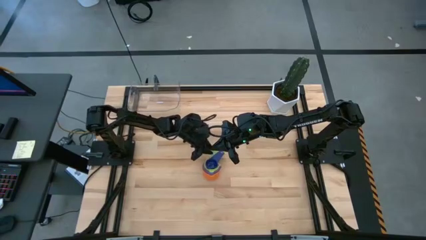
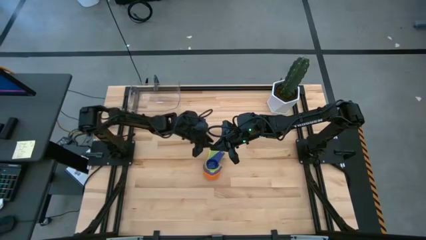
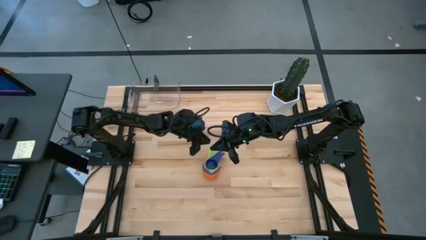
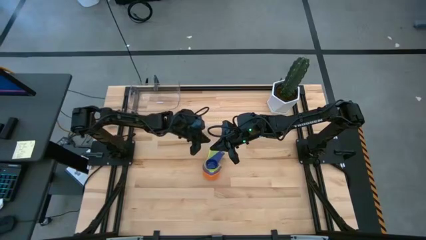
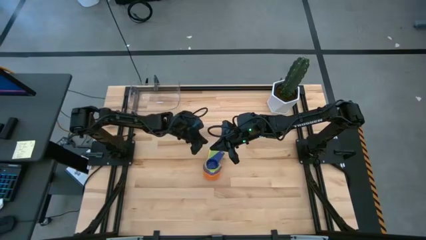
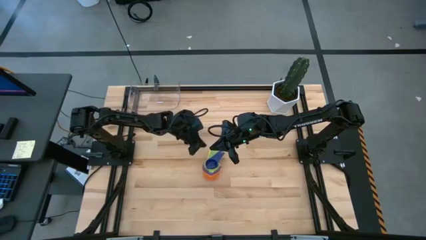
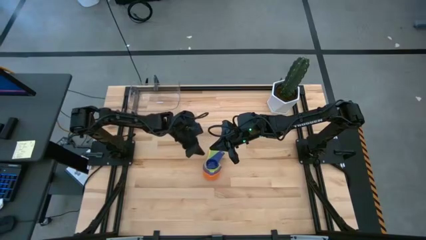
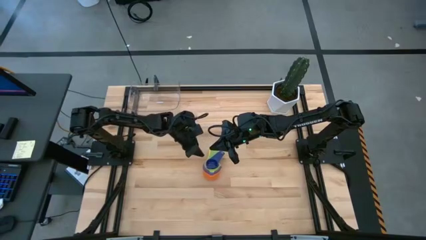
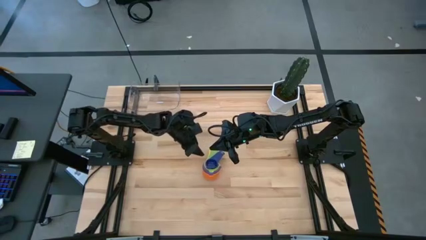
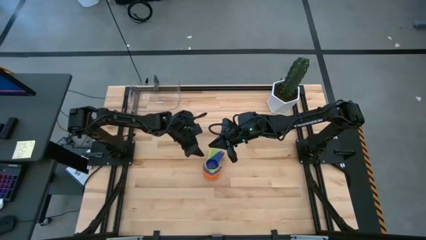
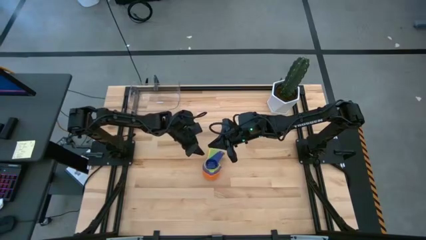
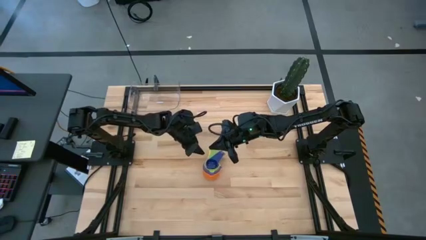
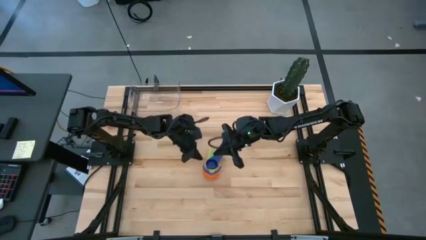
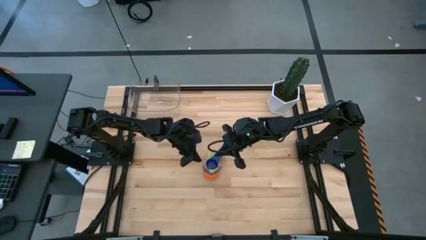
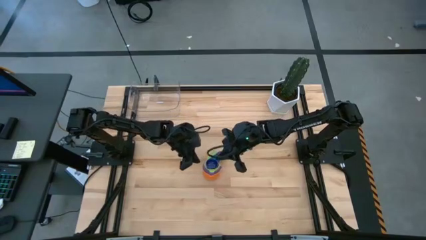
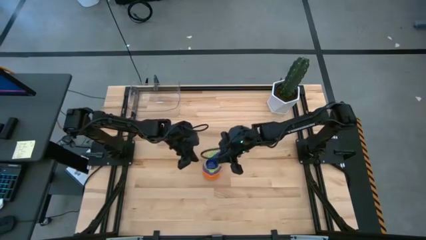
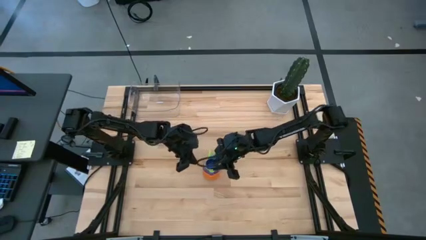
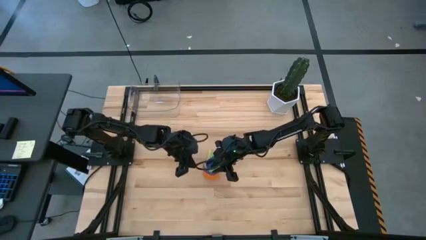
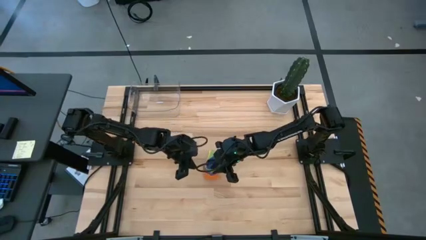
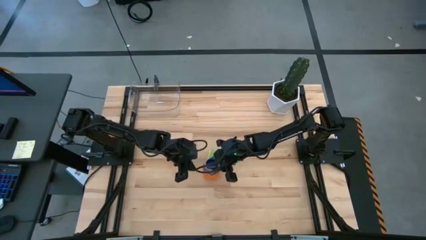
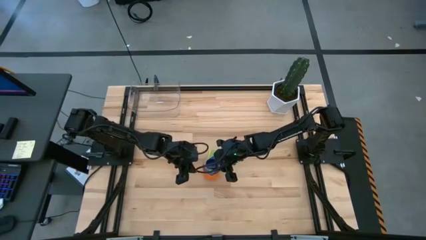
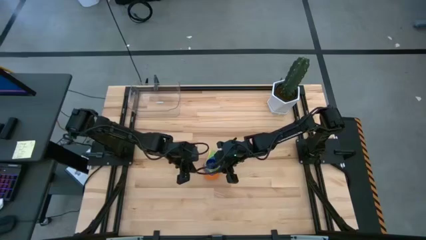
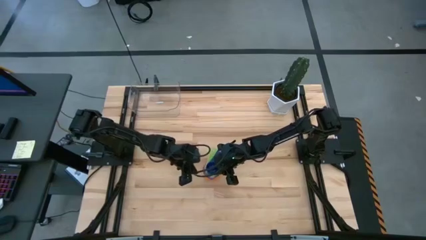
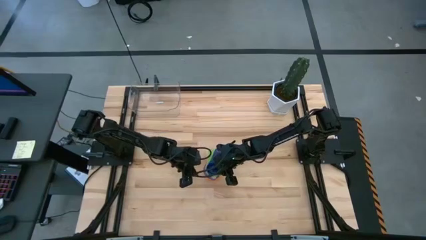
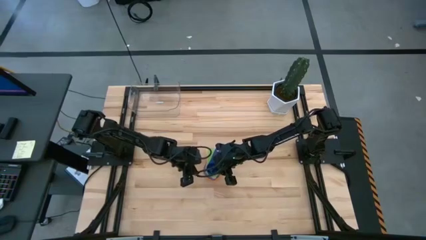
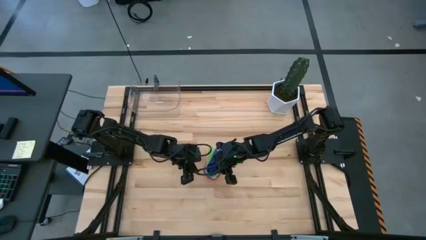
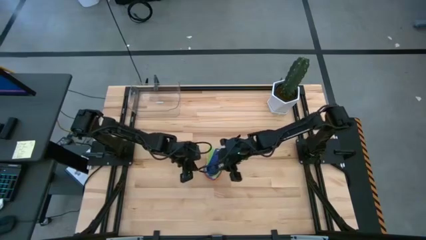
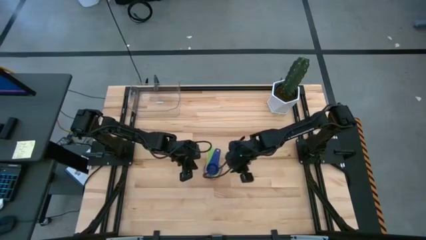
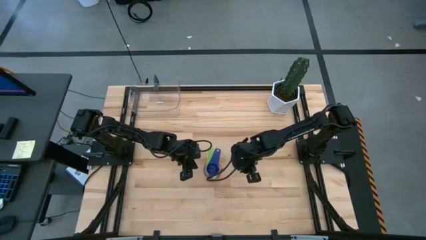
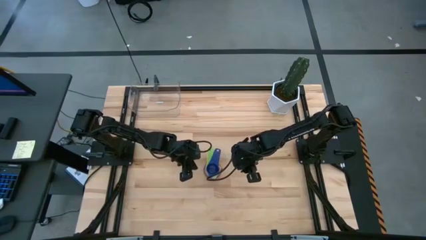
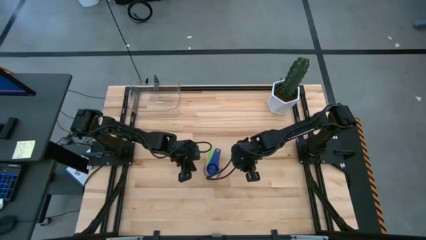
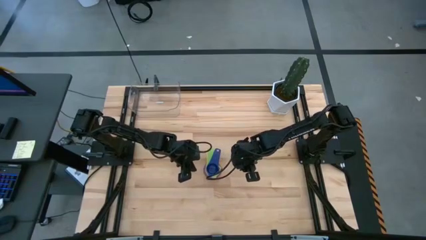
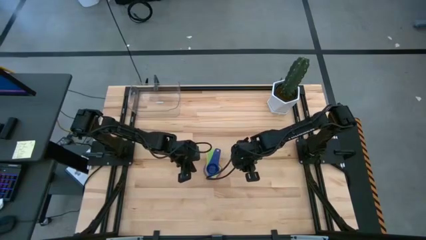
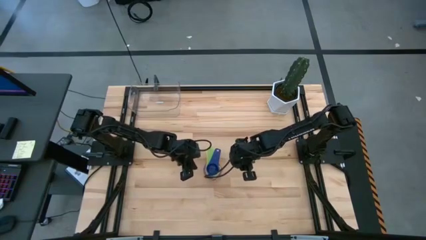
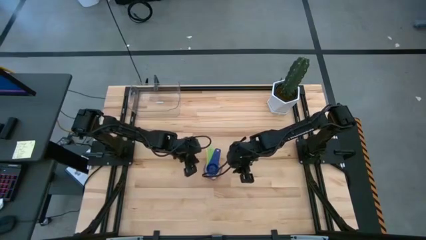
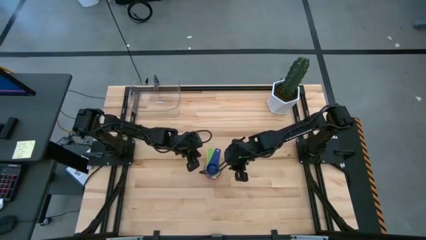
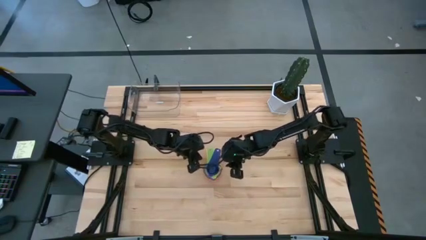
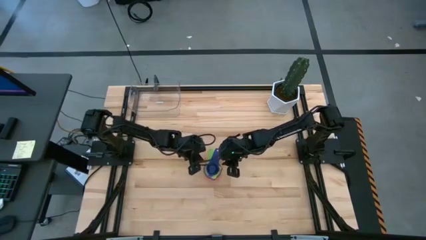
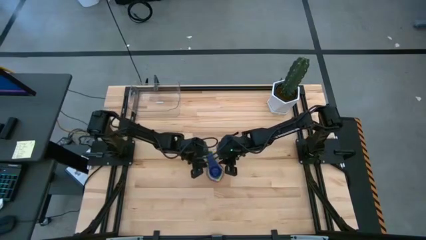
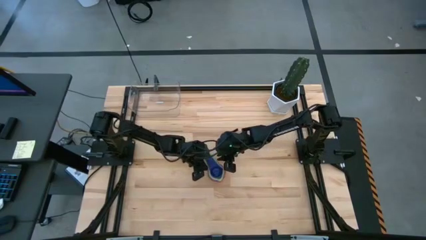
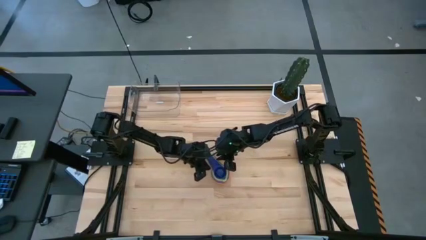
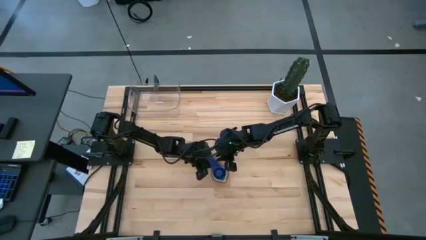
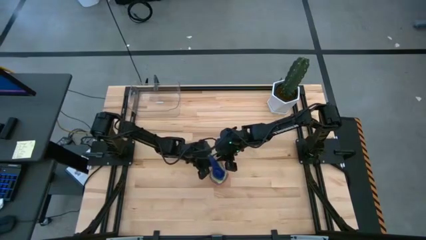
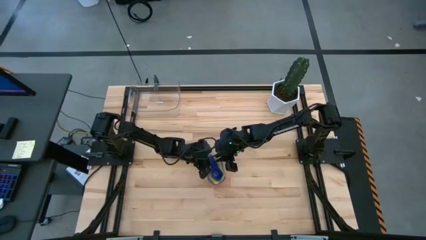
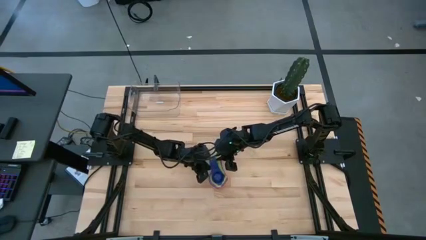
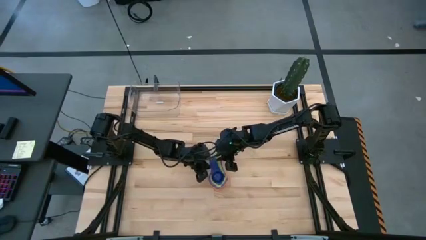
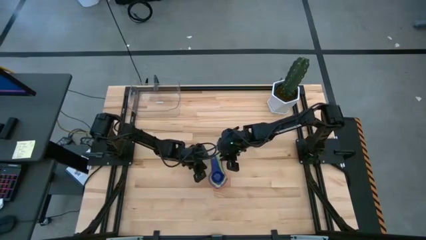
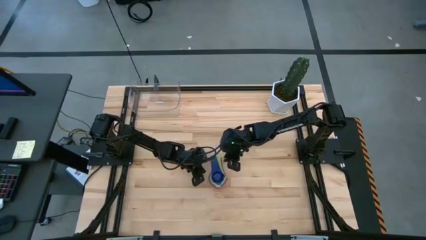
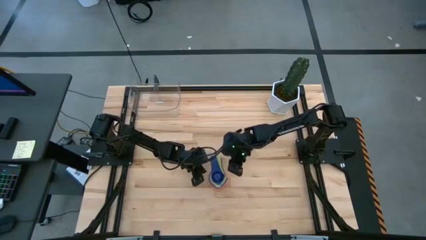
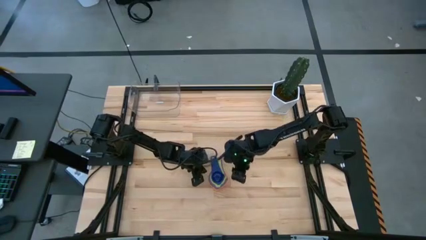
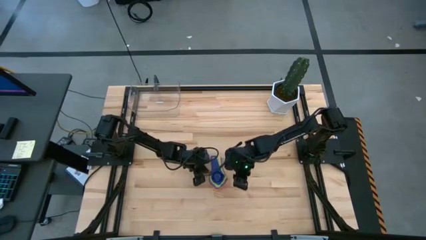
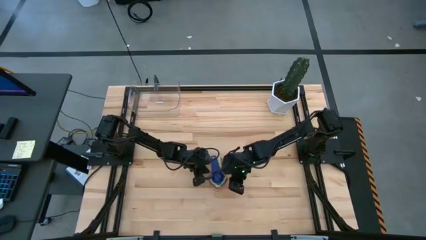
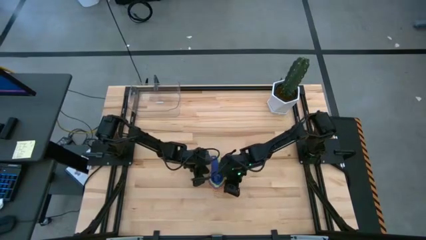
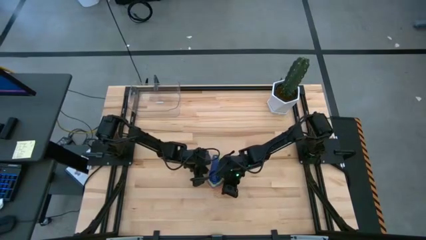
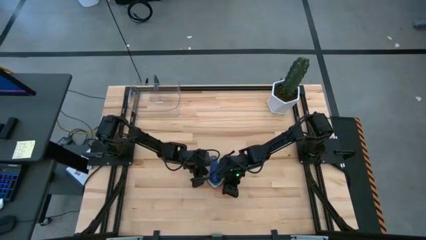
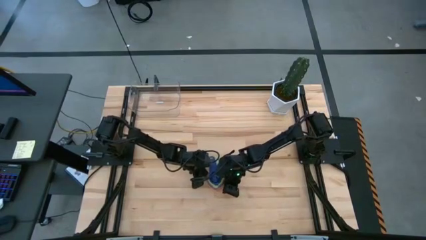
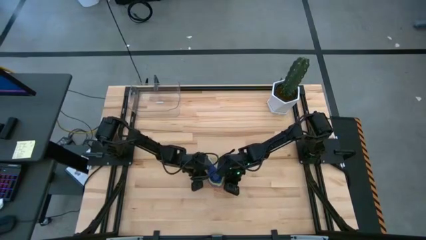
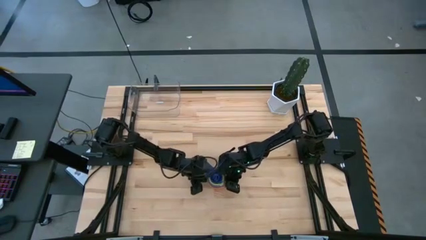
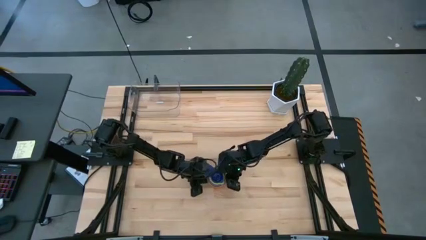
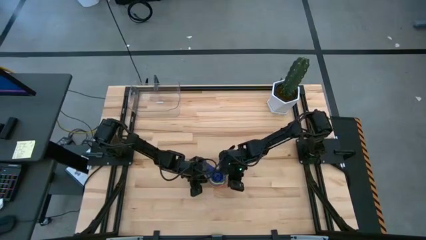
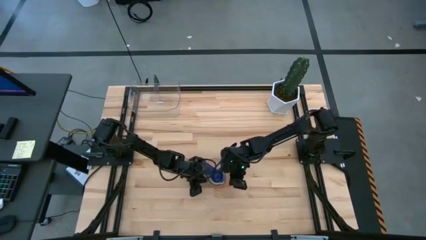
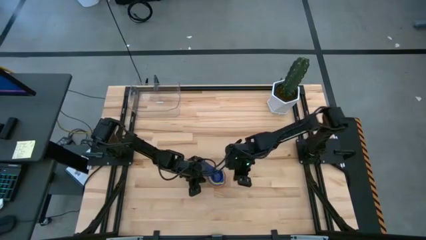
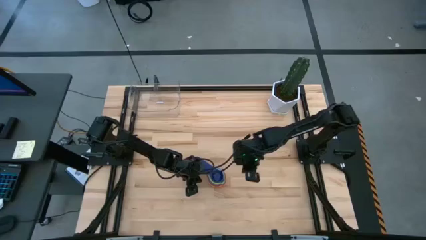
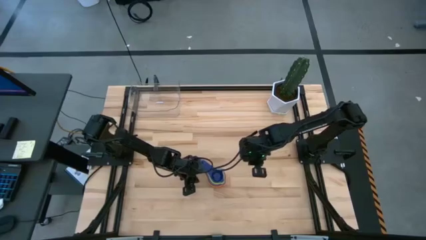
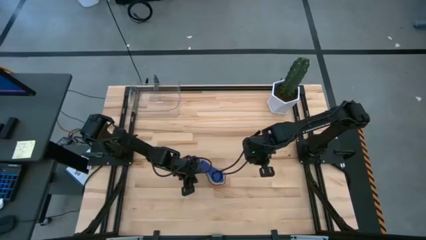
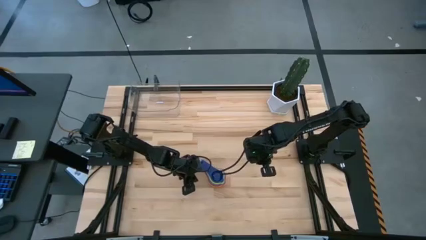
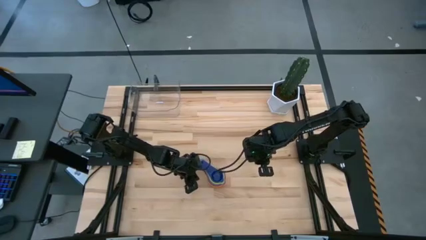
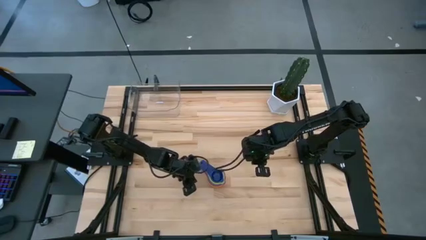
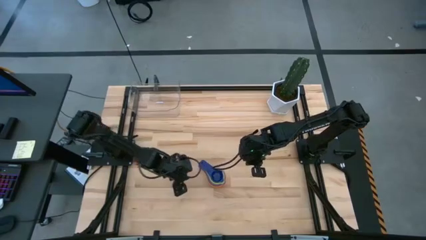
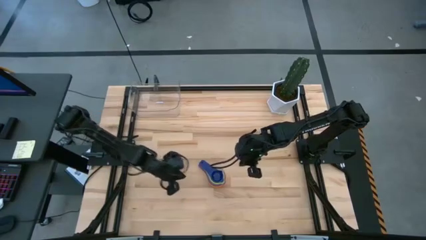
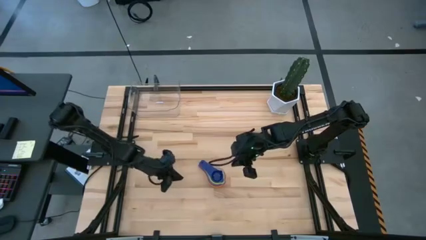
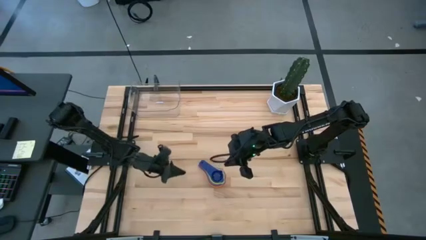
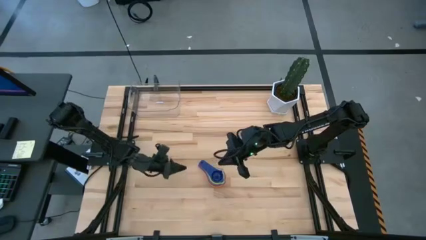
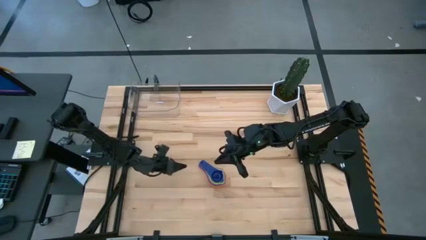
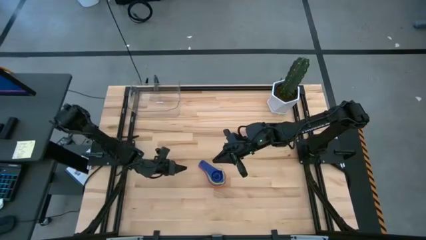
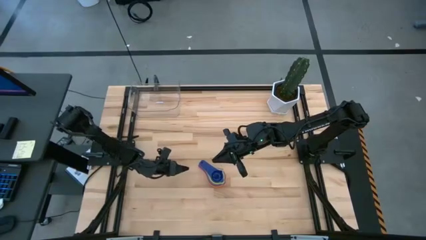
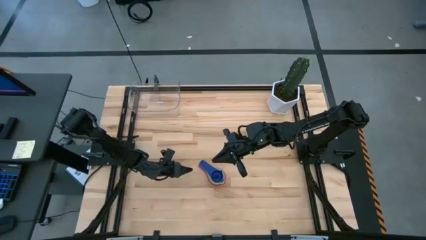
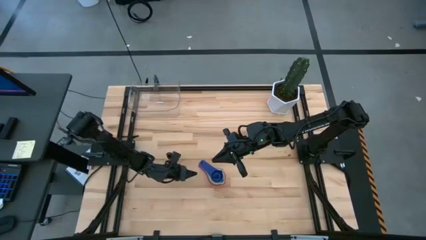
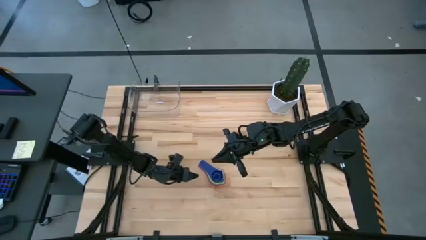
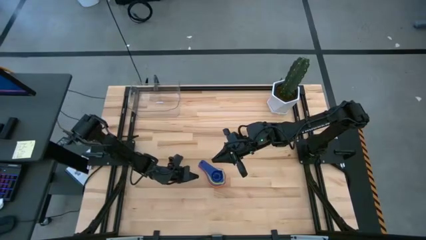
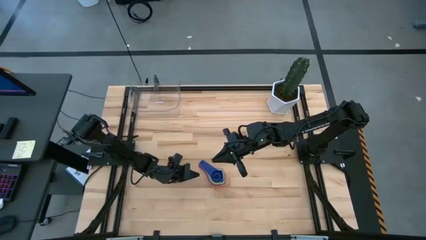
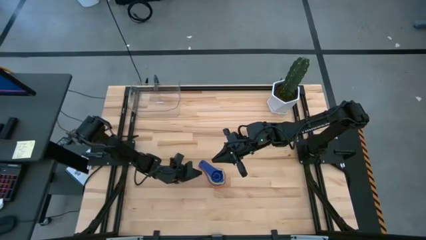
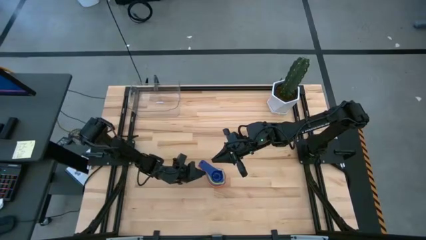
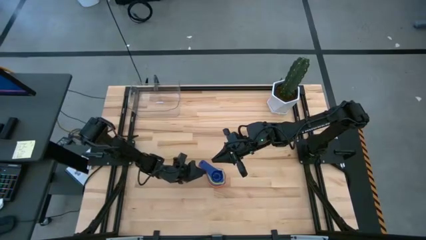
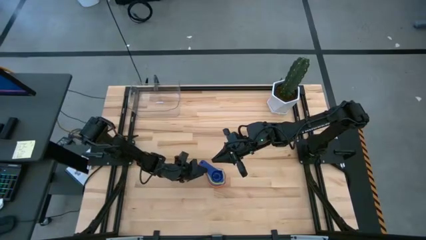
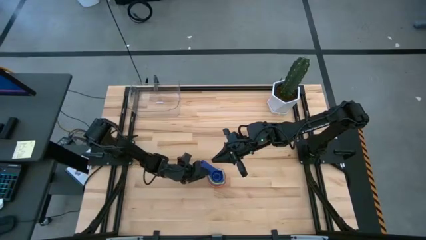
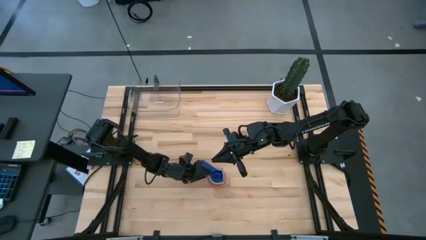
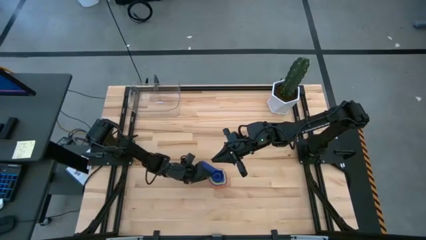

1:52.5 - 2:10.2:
Task: Nest measuring cups in basket
Put the stacked nesting measuring cups into the transparent bin
